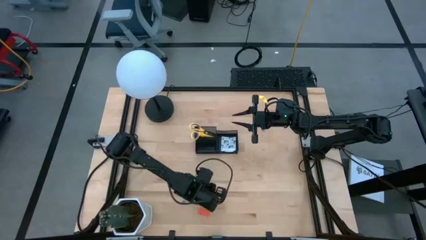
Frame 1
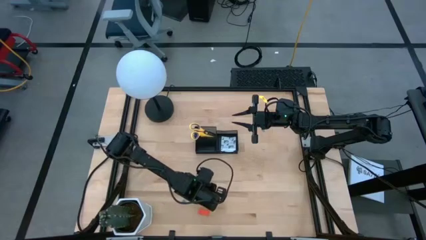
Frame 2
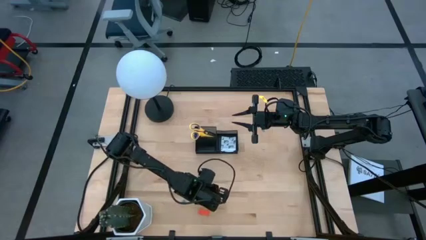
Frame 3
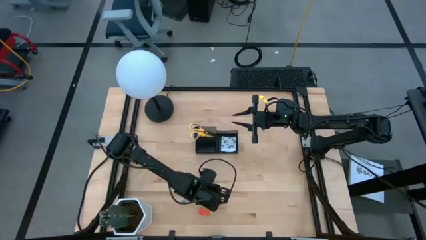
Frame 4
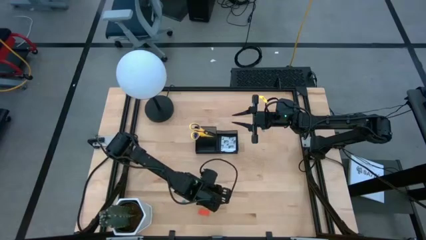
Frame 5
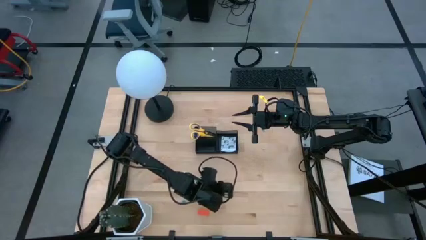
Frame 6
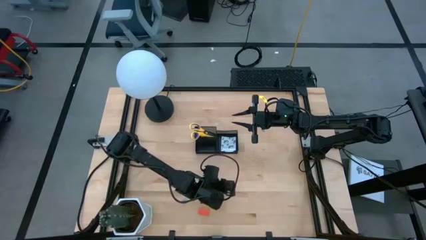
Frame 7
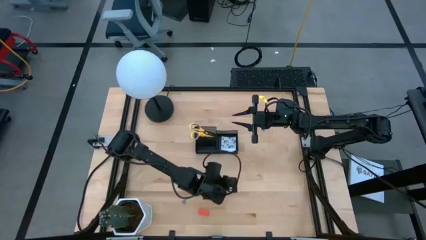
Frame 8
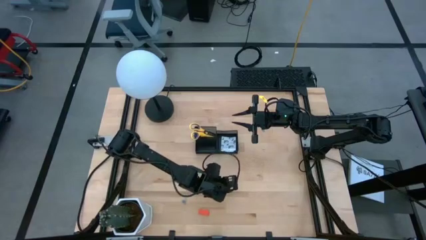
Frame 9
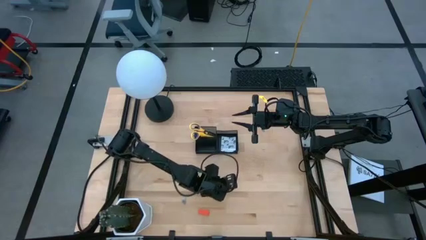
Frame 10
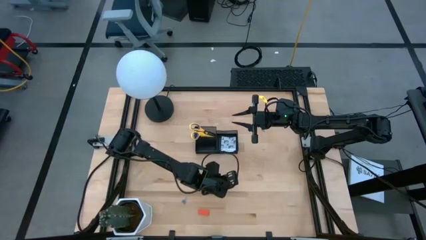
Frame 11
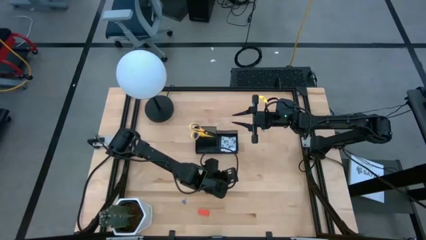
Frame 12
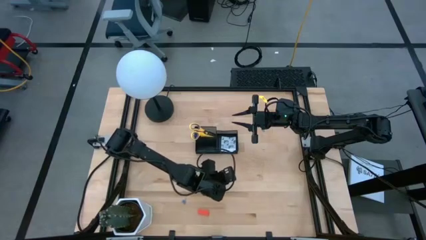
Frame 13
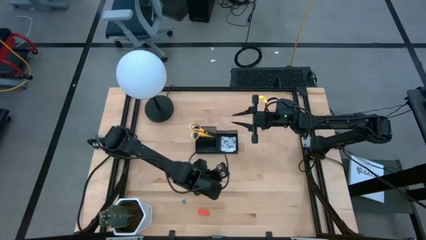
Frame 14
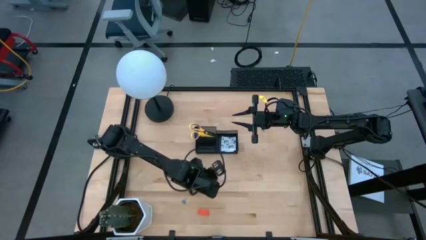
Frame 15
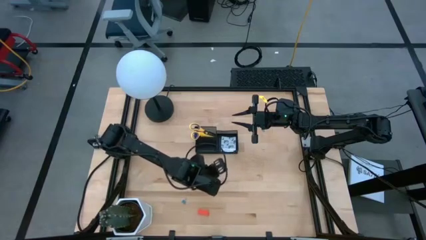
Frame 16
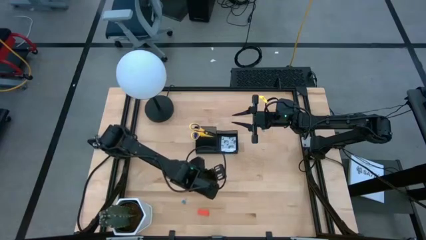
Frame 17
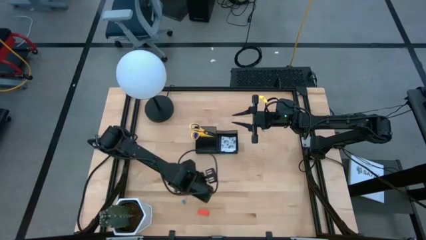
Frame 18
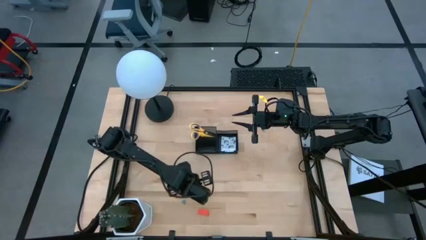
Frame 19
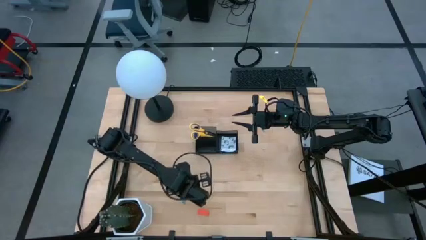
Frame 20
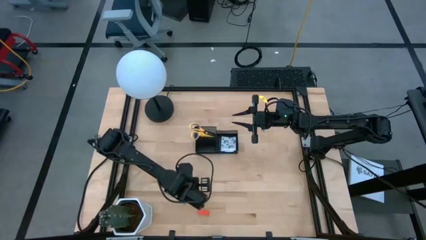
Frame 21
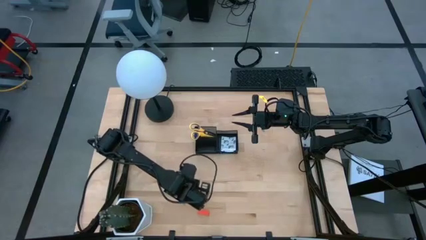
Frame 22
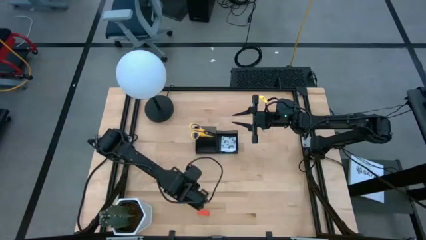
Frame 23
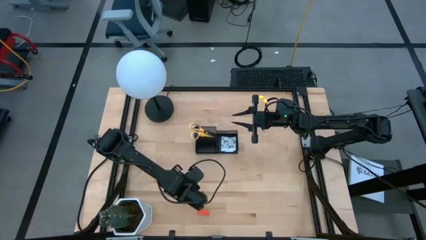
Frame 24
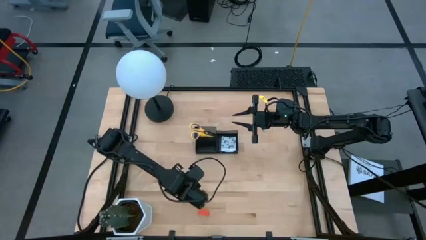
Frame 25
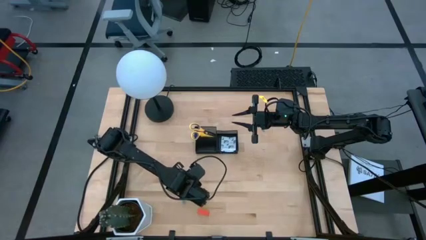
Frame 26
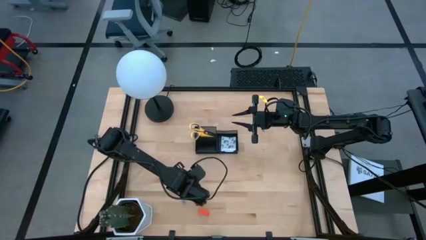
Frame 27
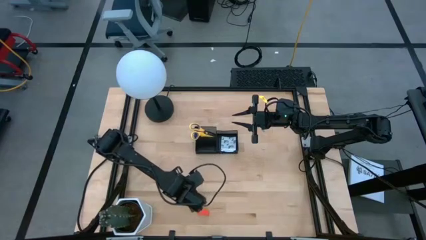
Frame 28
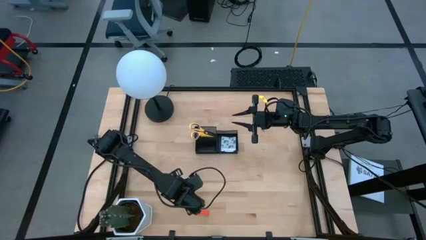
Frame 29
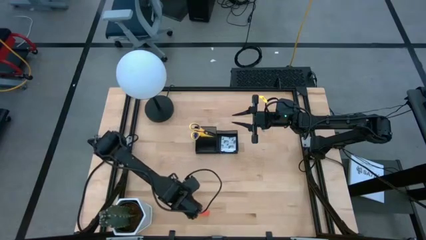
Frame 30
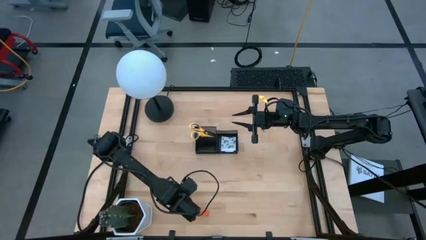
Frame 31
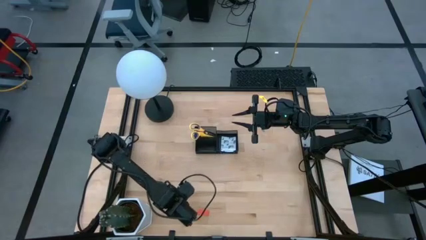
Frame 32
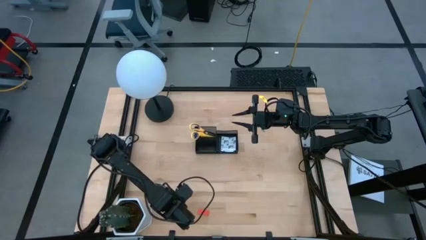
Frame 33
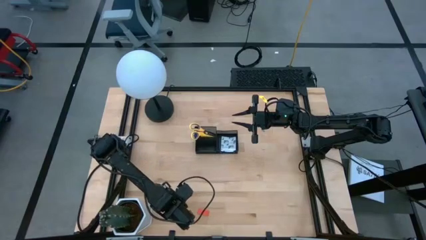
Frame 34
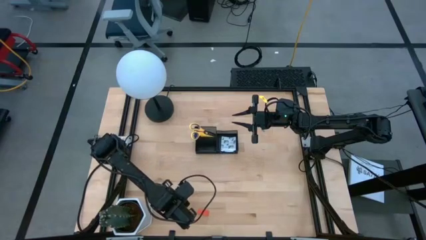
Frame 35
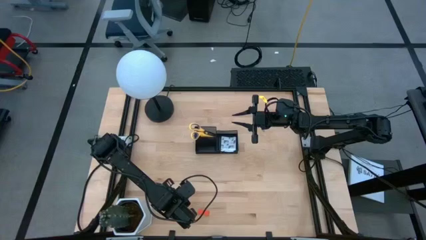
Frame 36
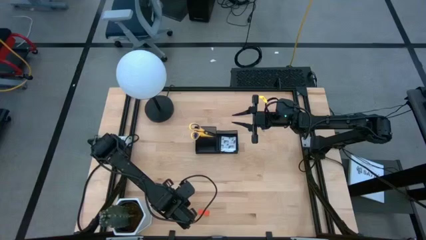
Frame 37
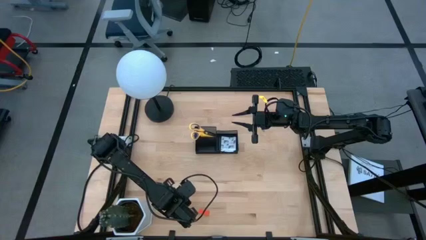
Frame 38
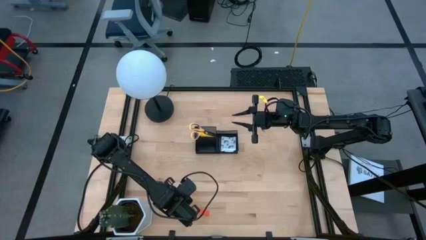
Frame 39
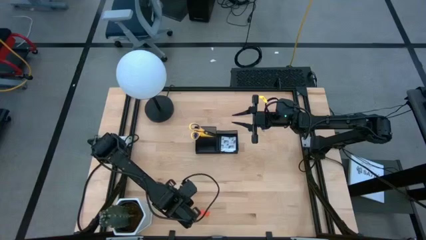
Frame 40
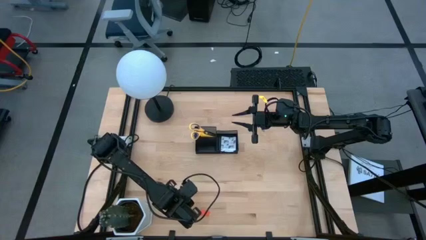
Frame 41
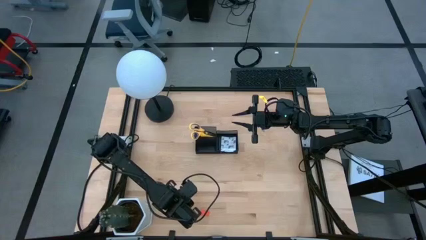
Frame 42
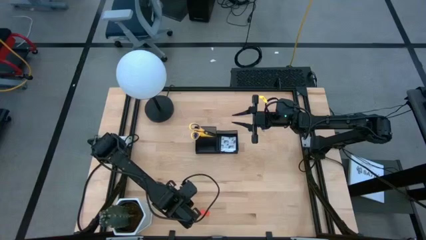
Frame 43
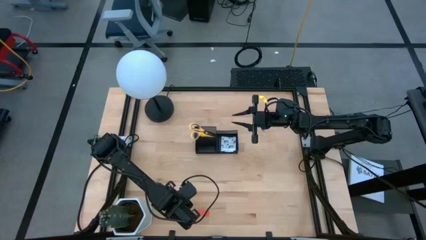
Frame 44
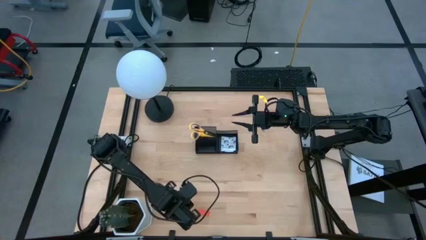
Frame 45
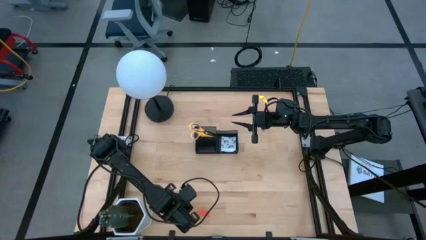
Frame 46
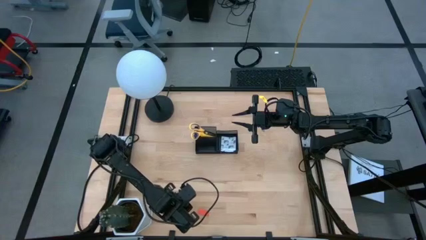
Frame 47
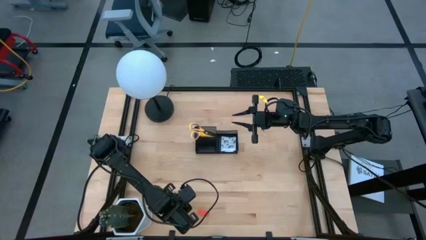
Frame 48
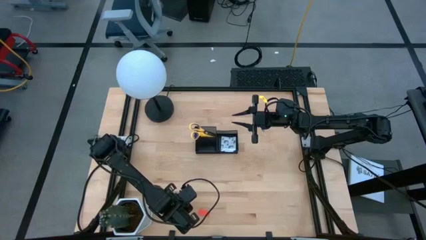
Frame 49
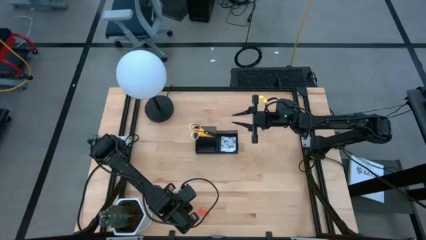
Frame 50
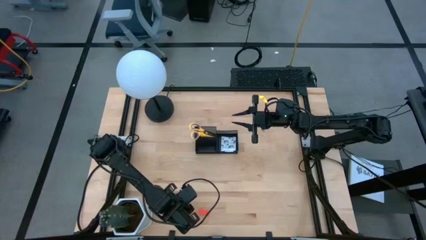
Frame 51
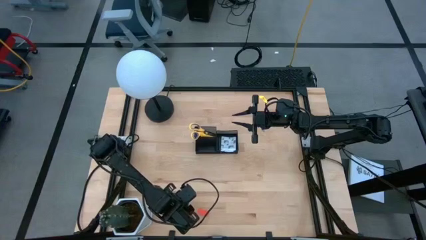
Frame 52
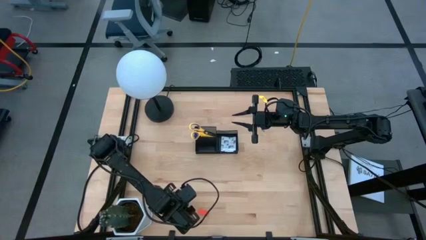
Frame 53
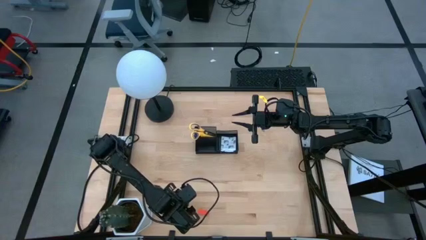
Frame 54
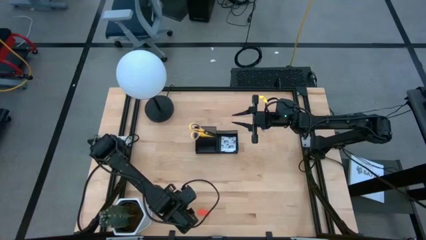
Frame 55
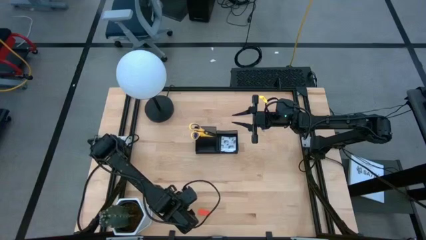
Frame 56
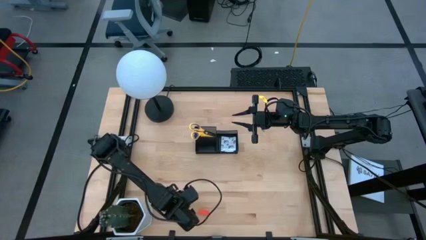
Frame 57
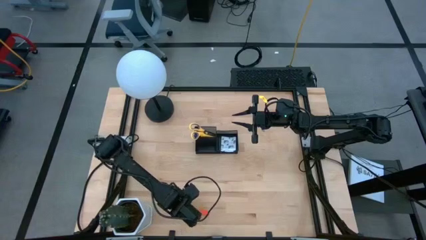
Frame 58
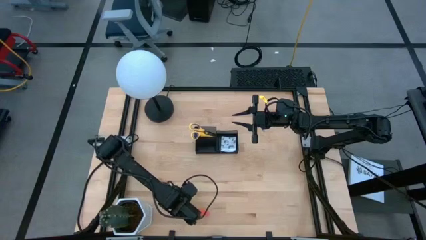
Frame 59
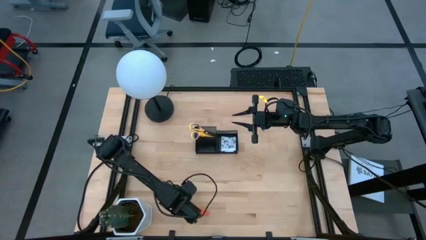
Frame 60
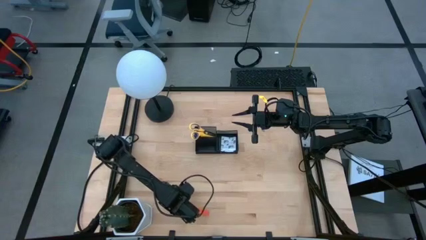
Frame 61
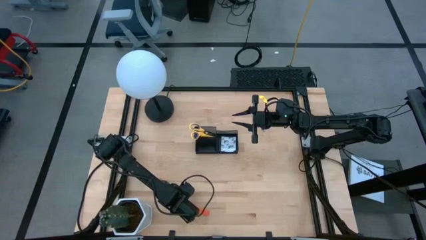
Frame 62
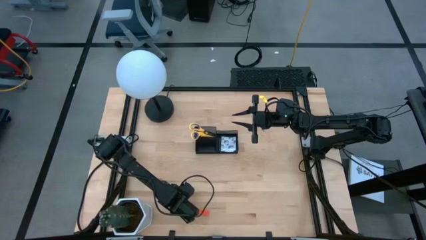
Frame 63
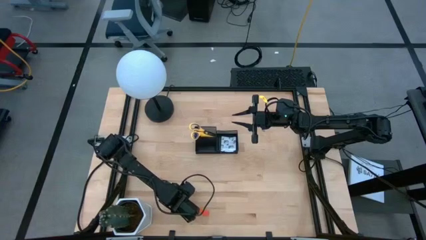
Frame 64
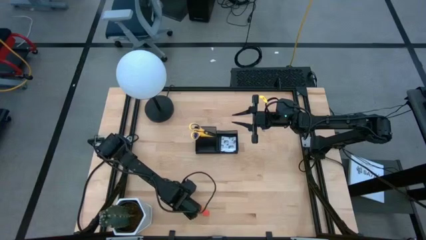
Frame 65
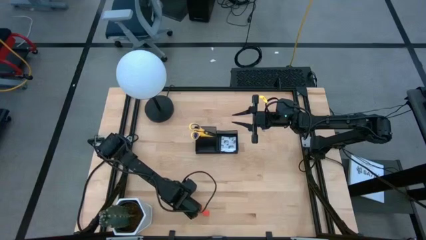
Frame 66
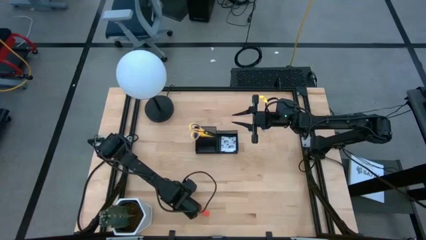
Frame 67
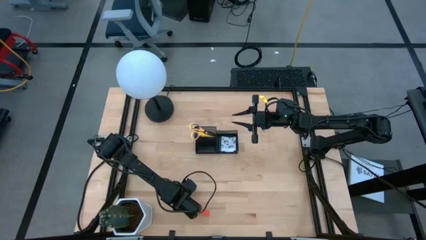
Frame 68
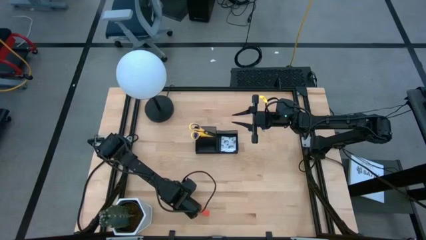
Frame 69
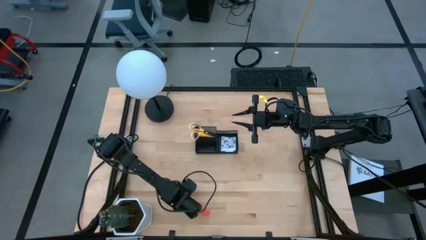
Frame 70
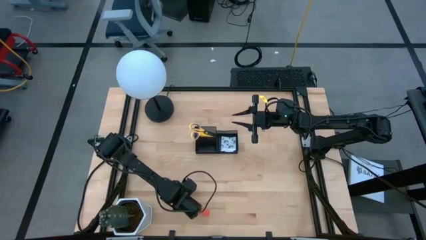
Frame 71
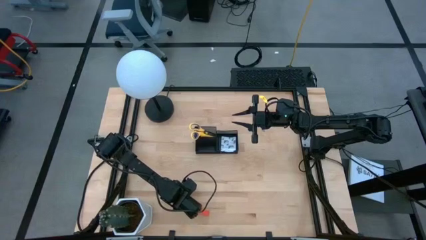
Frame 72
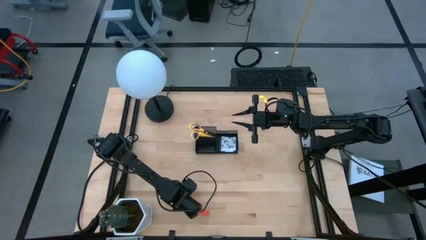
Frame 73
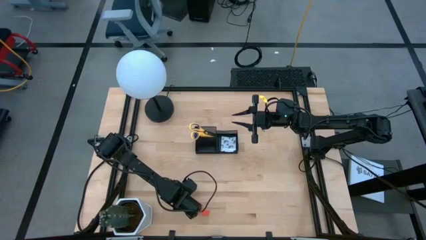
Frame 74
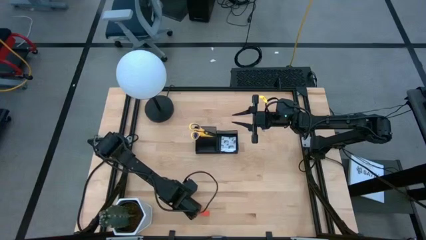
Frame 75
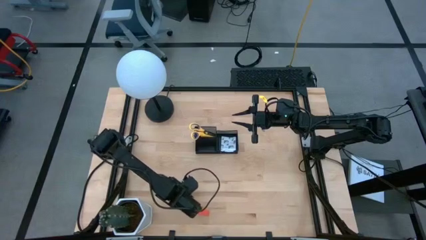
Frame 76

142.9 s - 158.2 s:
Task: Pick and place office supplies into organizer
Put the blue binder clip into the desk organizer

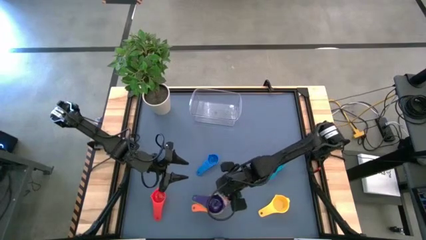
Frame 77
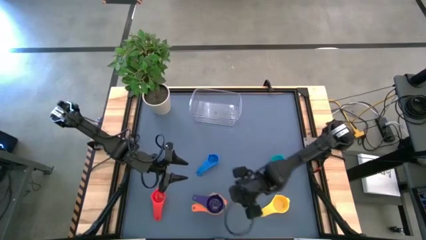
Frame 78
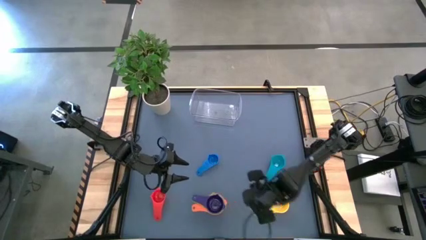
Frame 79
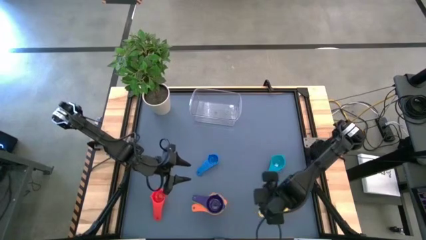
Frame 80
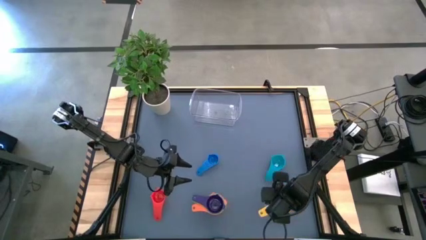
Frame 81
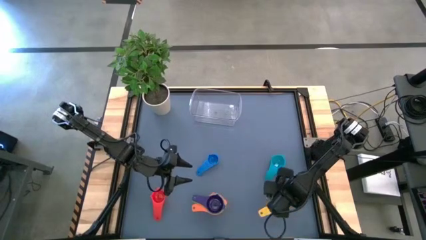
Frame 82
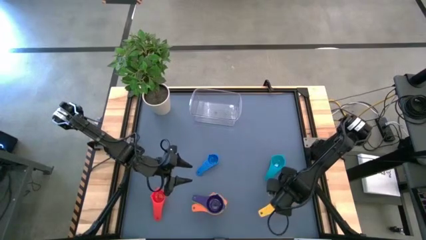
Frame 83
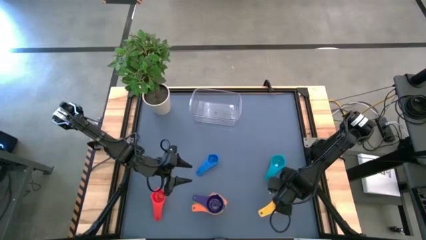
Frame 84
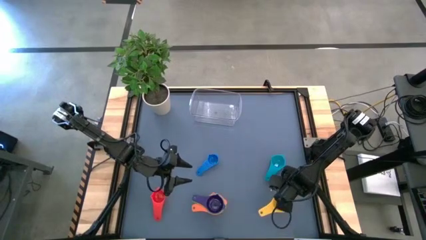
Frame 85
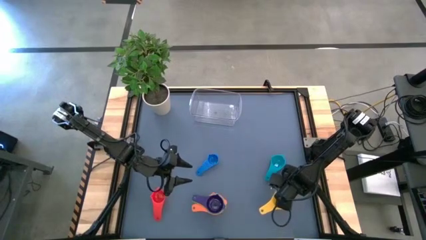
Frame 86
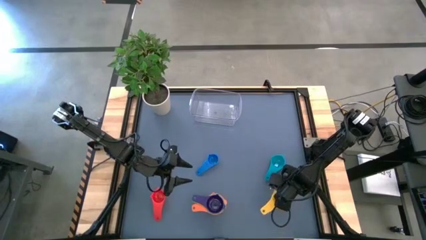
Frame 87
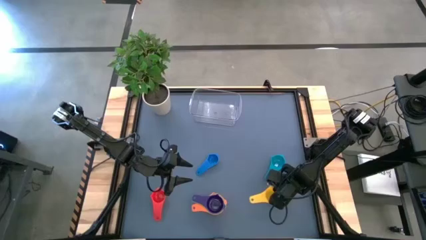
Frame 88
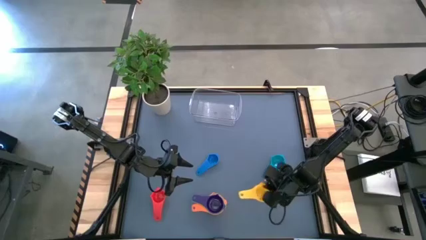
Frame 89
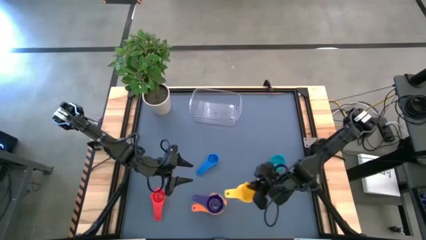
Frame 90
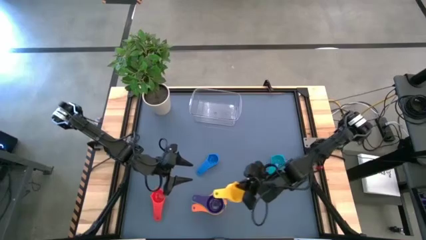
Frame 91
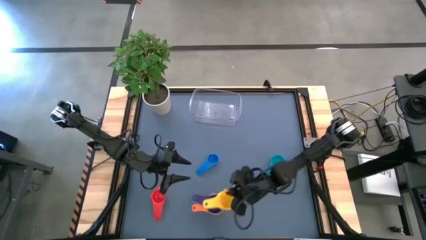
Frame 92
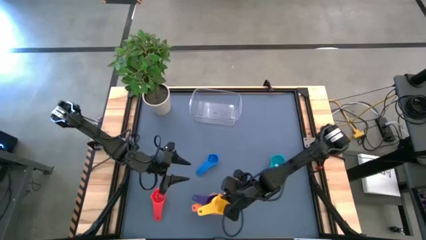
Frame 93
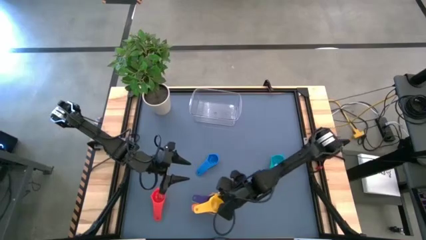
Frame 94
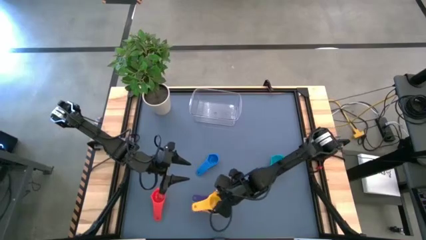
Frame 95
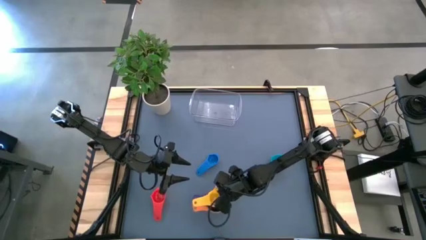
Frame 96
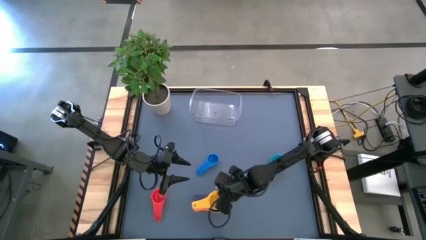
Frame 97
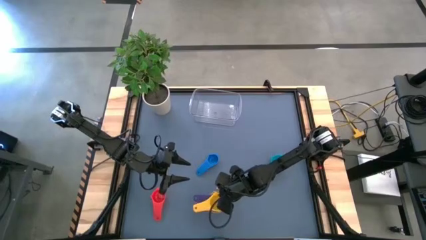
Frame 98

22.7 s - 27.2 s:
Task: Nest measuring cups in basket
Stack the yellow measuring cup on top of the purple measuring cup
